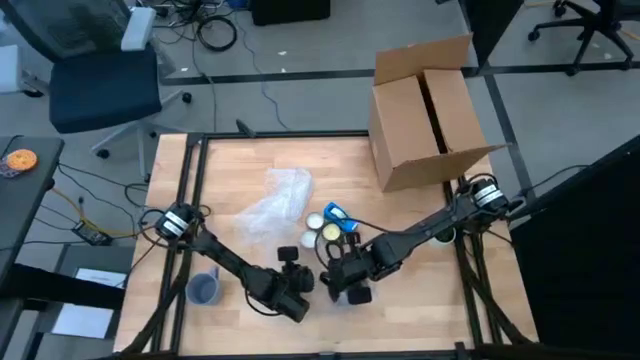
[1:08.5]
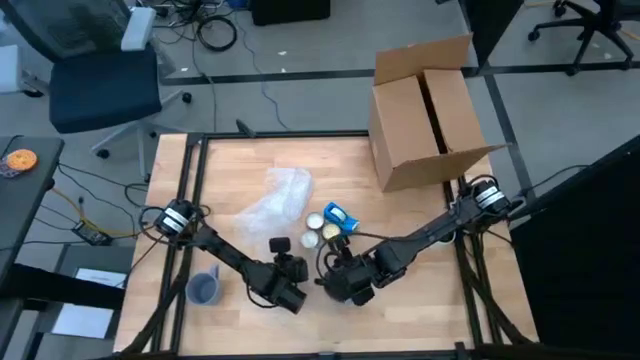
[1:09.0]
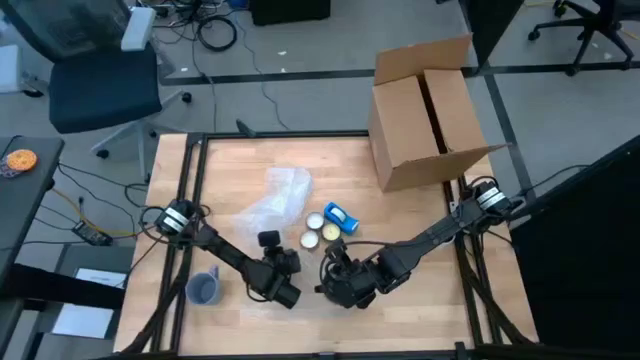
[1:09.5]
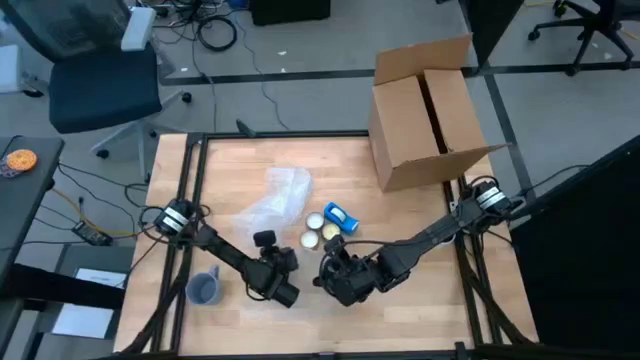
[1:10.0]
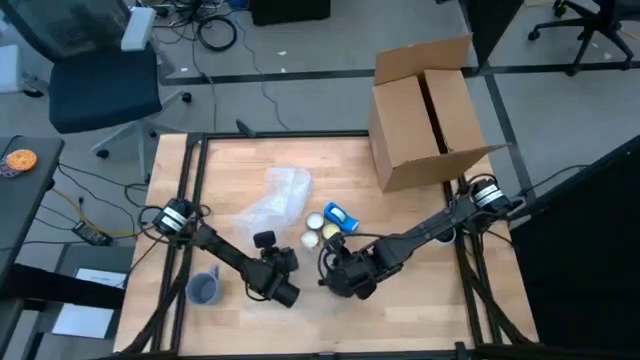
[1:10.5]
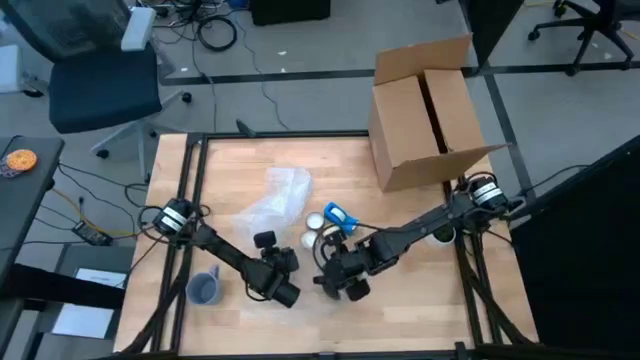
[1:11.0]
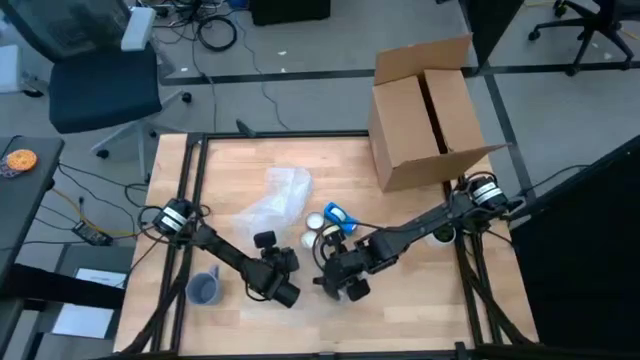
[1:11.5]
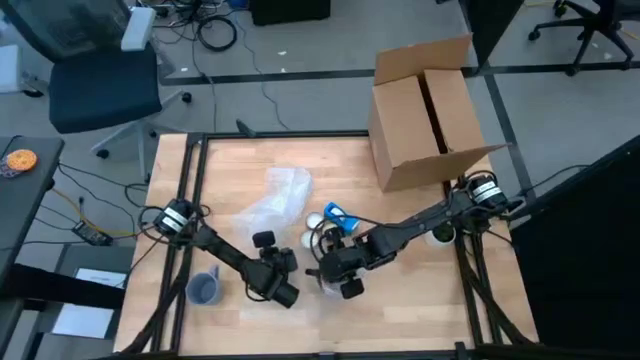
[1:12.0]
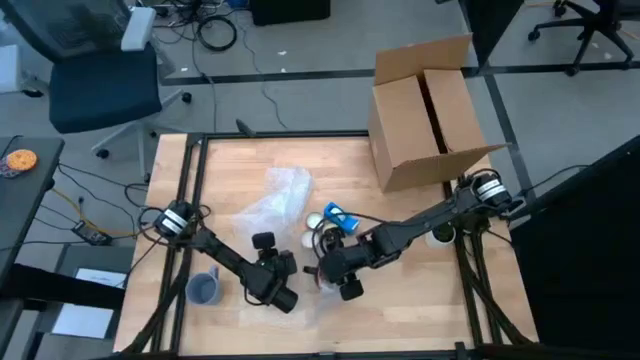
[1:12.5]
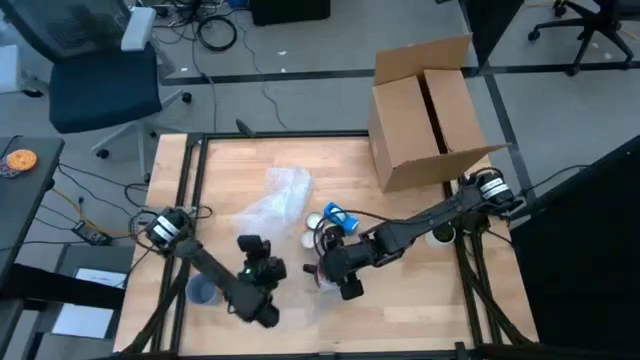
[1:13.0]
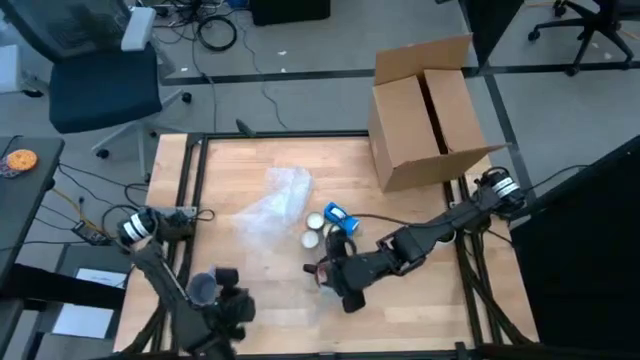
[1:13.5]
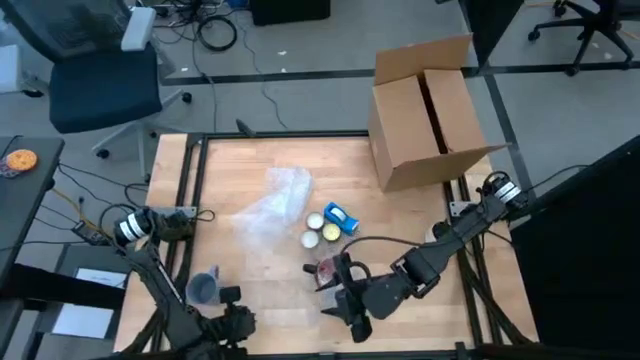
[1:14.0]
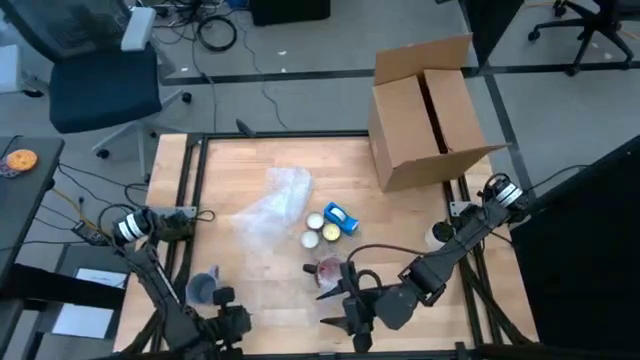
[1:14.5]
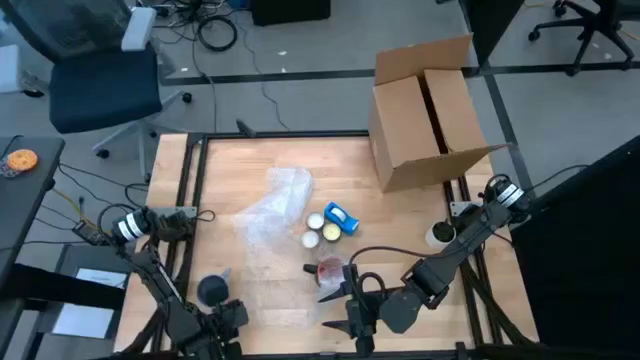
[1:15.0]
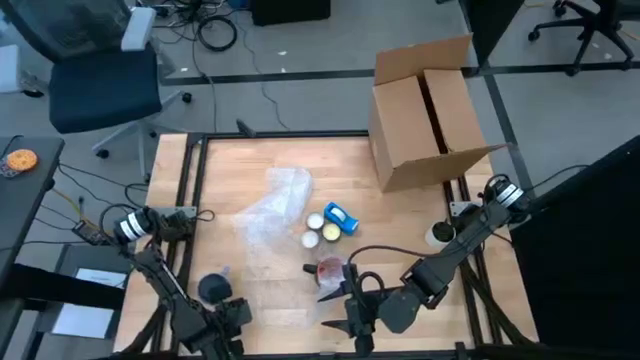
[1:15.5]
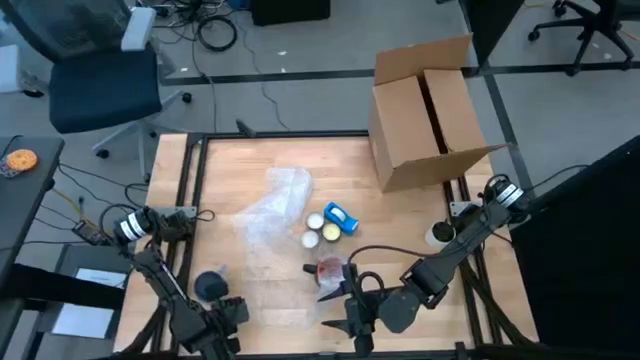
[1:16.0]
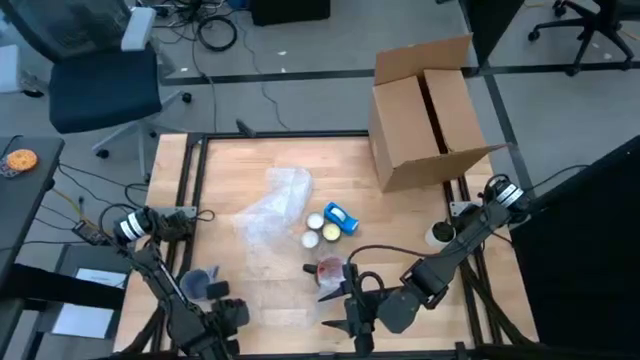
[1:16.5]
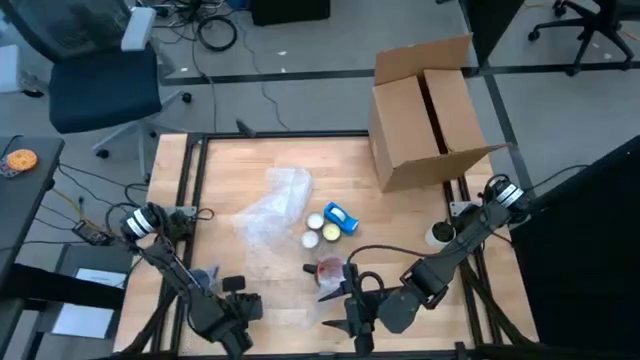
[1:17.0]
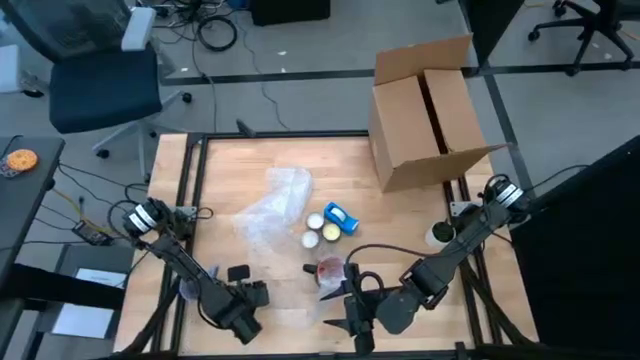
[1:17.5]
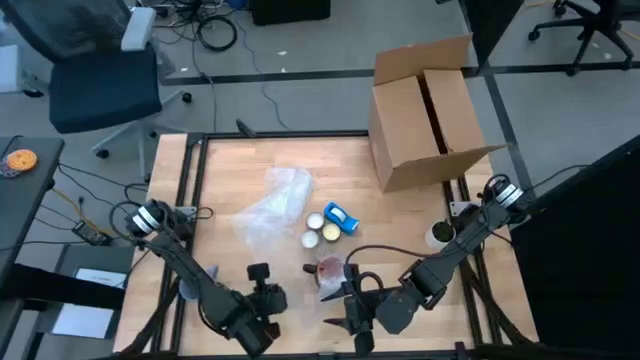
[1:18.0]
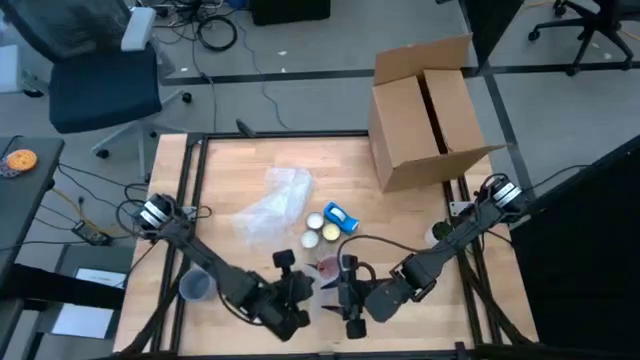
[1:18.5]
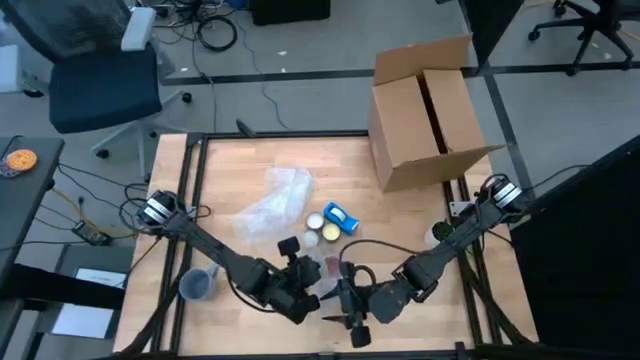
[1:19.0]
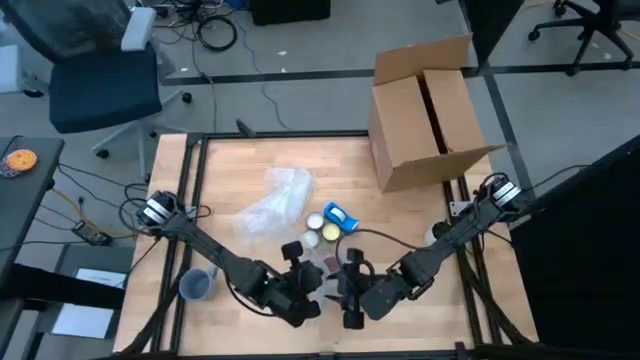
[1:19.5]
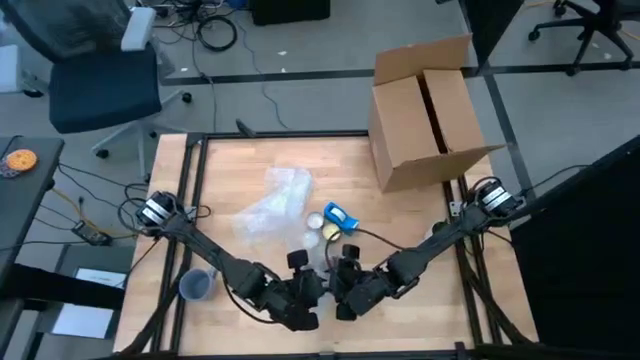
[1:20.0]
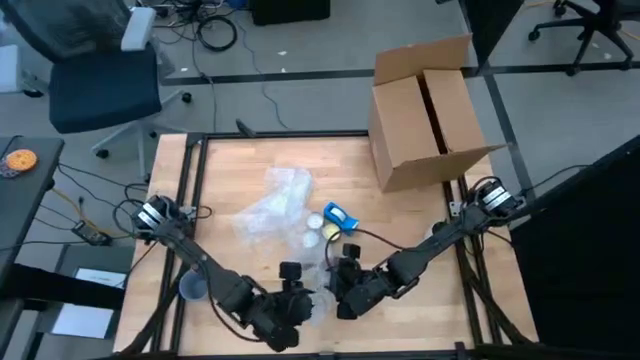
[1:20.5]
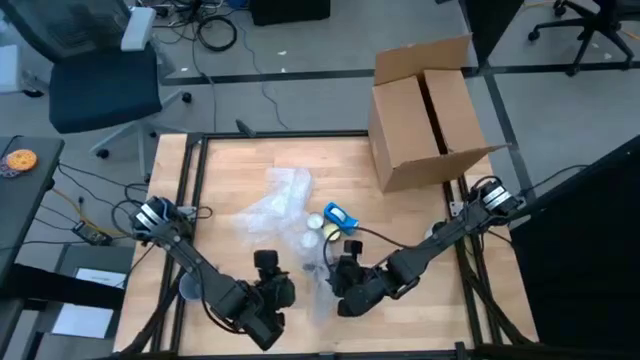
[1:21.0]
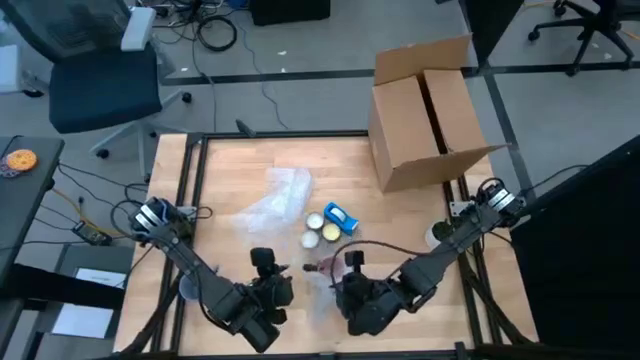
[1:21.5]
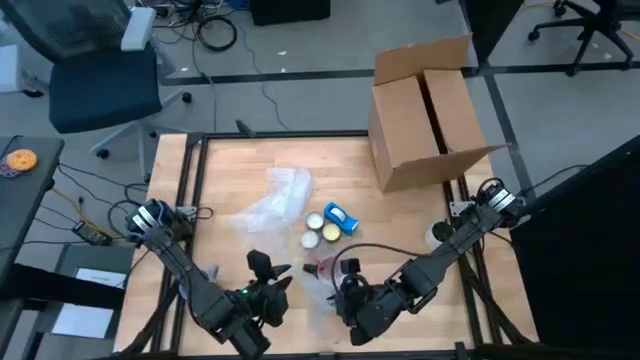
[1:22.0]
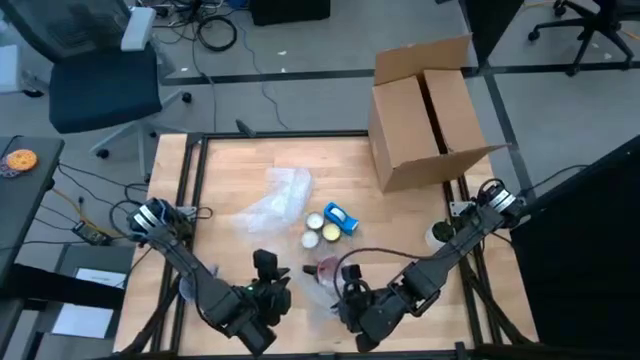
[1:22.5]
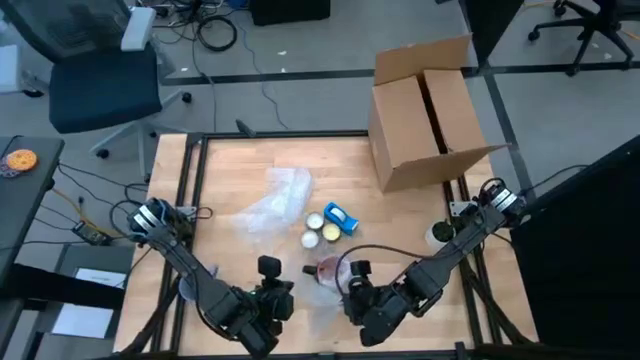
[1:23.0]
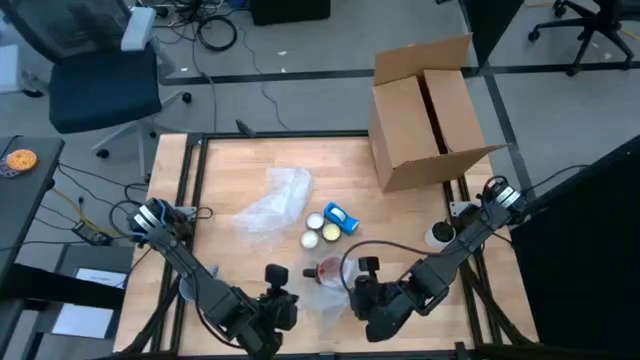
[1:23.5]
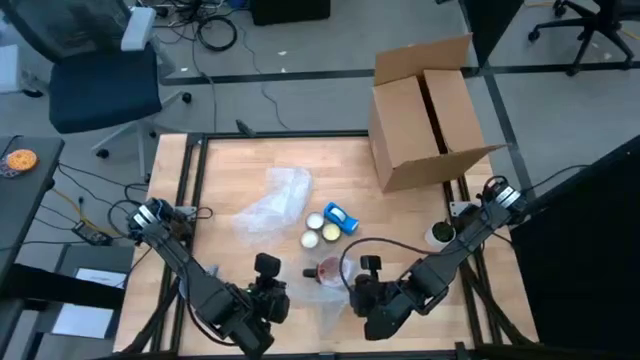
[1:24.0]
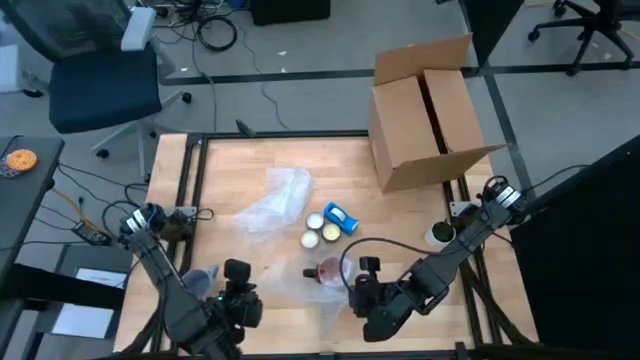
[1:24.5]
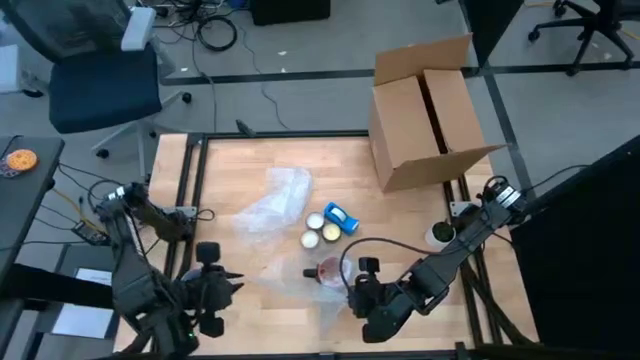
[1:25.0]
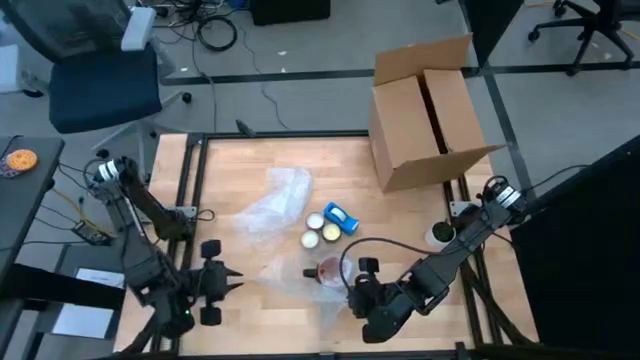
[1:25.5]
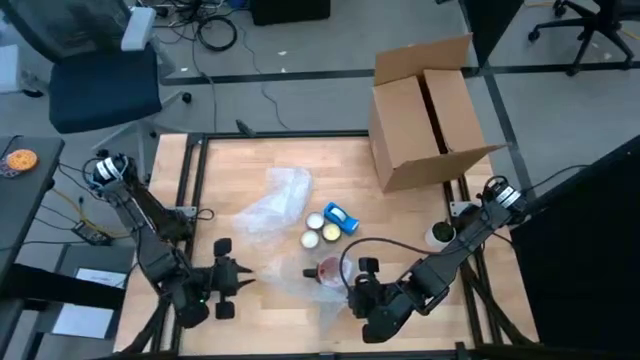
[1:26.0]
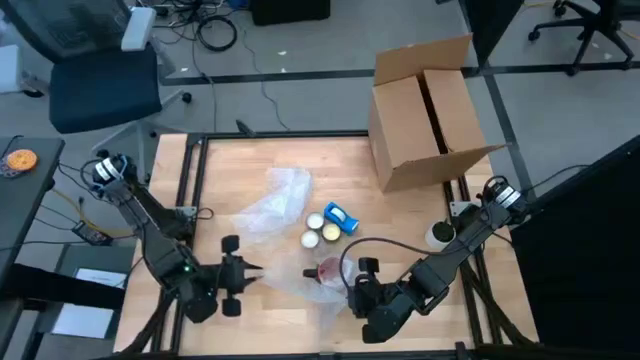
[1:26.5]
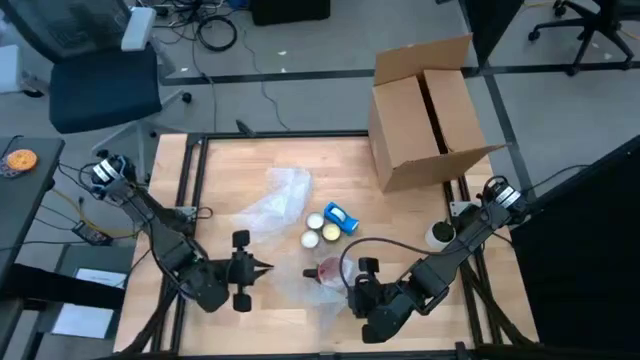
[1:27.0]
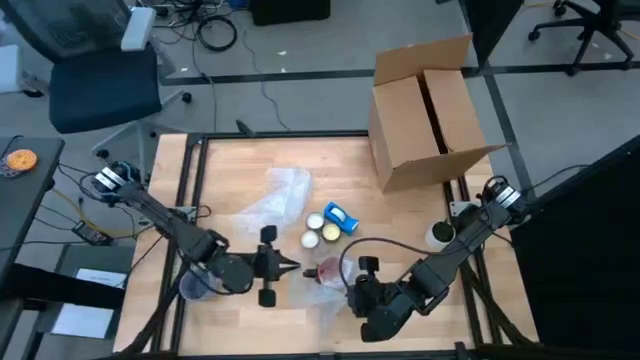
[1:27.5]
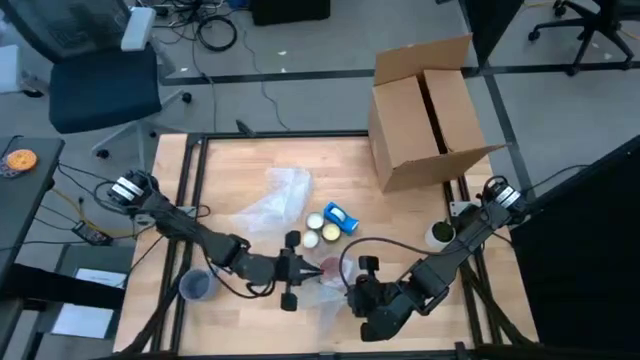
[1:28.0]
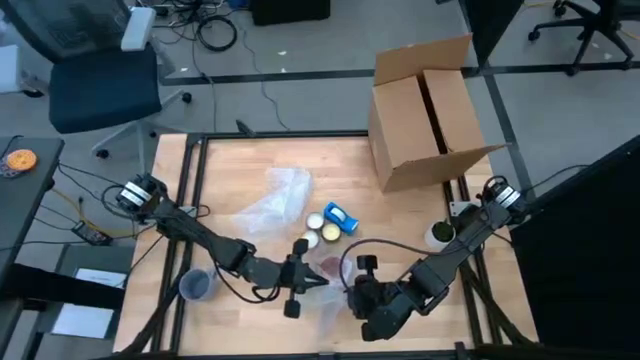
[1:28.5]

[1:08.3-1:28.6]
Task: wrap mug
Wrap the black mug with the transparent bubble wrap

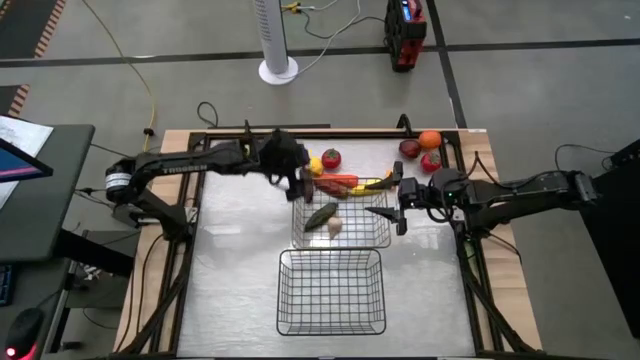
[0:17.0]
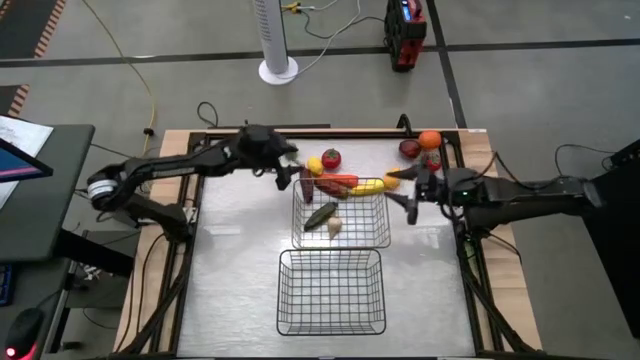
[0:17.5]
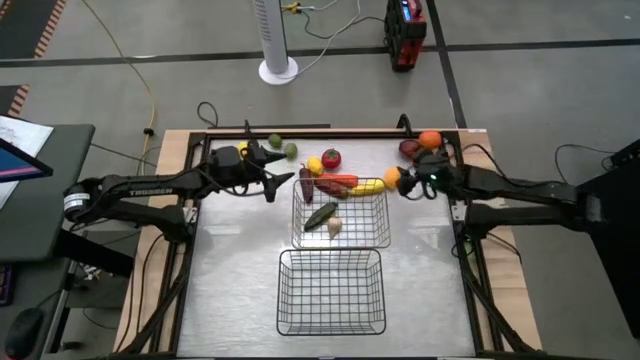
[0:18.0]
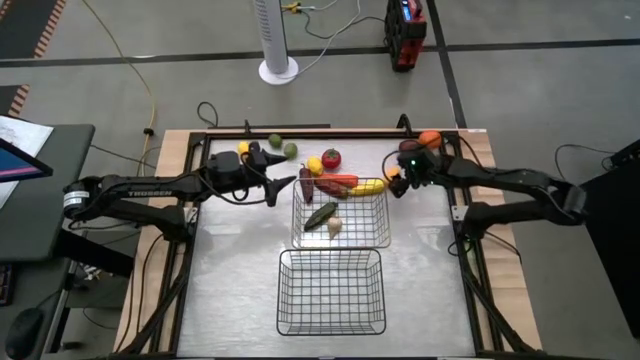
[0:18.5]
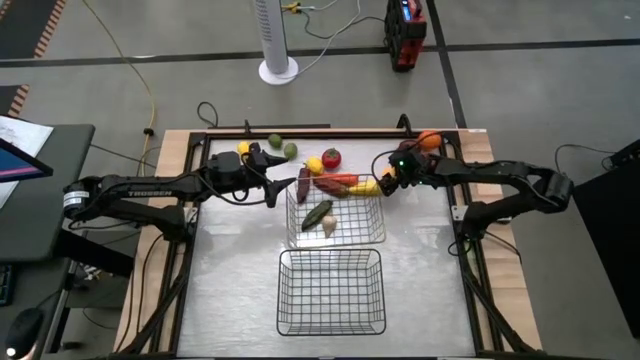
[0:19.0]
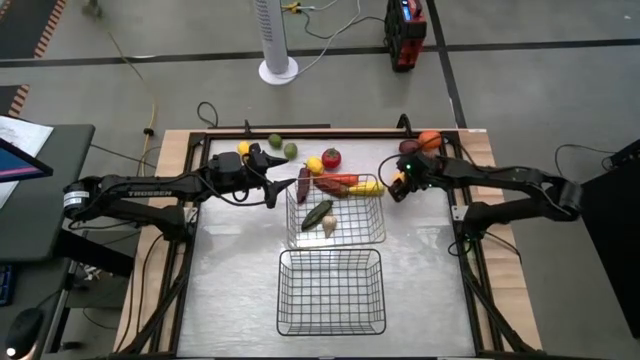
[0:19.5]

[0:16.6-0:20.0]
Task: Sort produce into baskets
Put the lemon into the bottom wire basket
